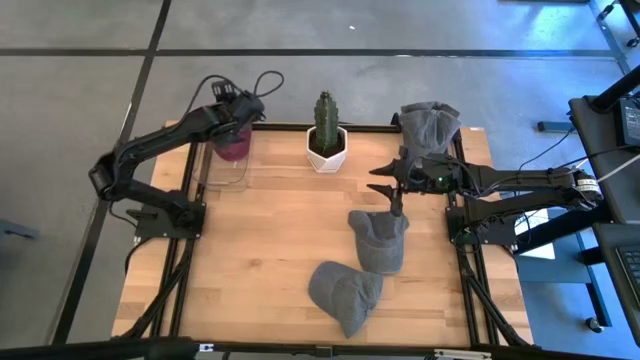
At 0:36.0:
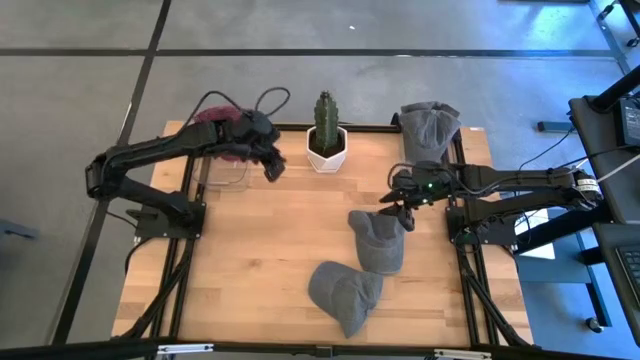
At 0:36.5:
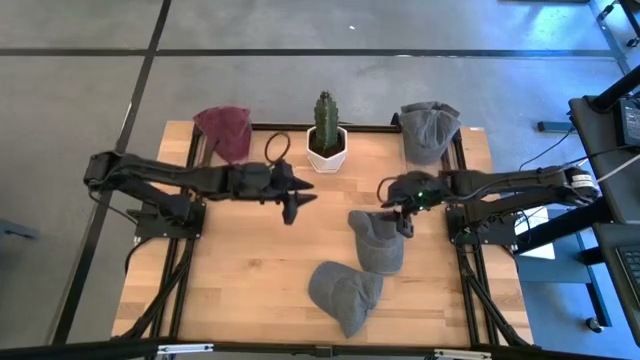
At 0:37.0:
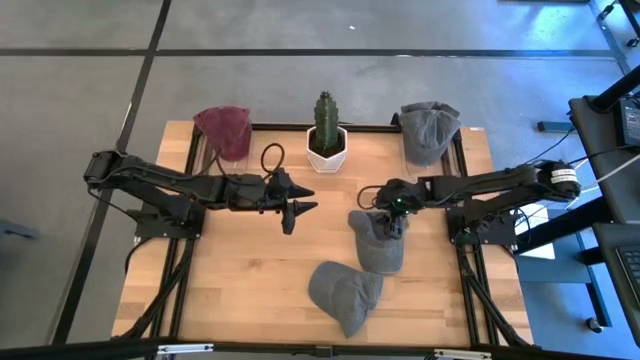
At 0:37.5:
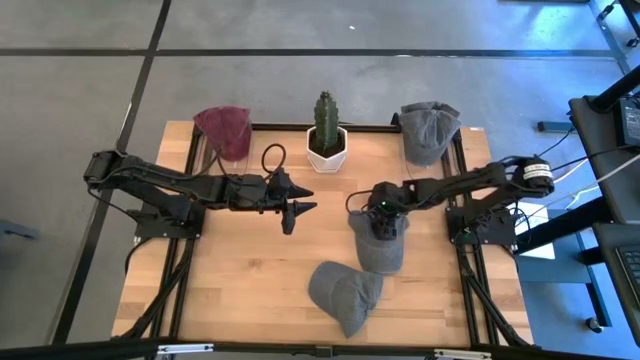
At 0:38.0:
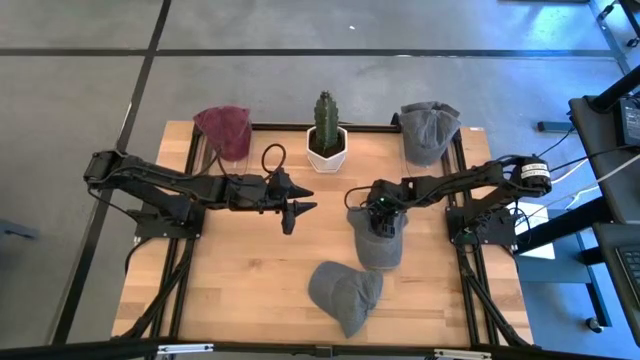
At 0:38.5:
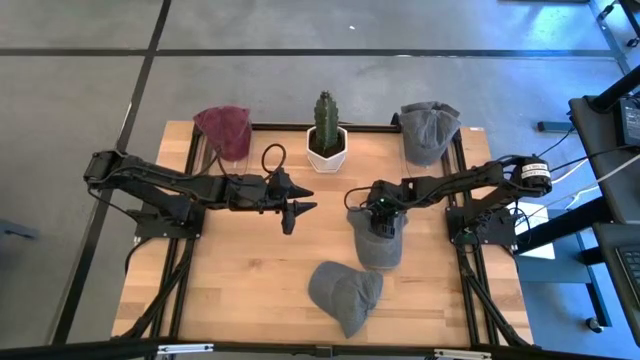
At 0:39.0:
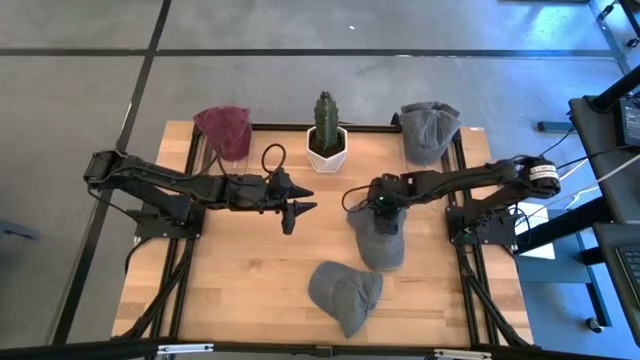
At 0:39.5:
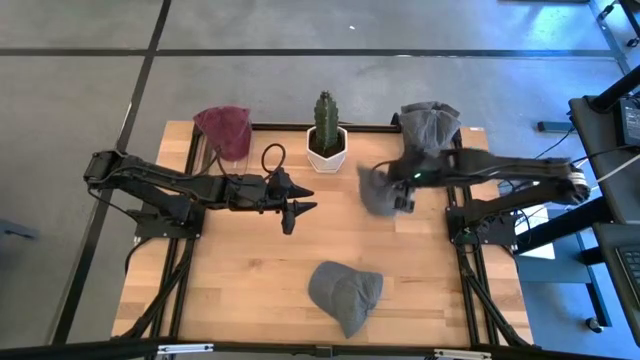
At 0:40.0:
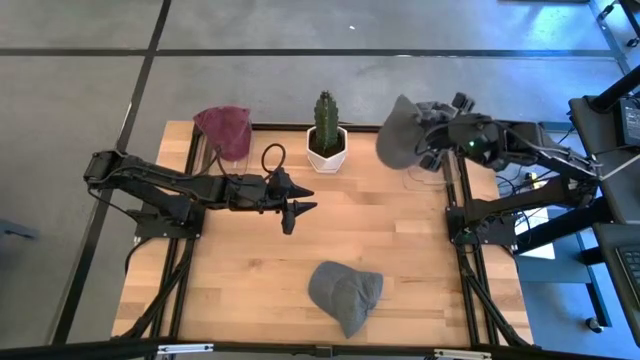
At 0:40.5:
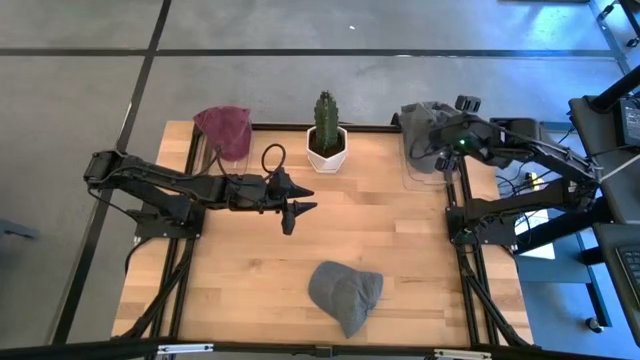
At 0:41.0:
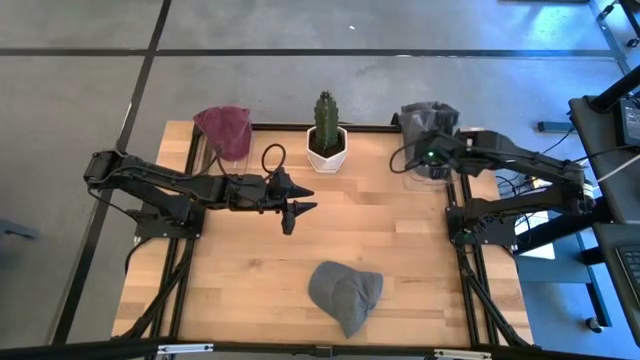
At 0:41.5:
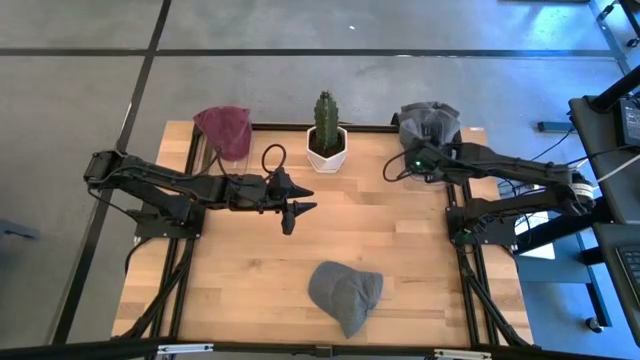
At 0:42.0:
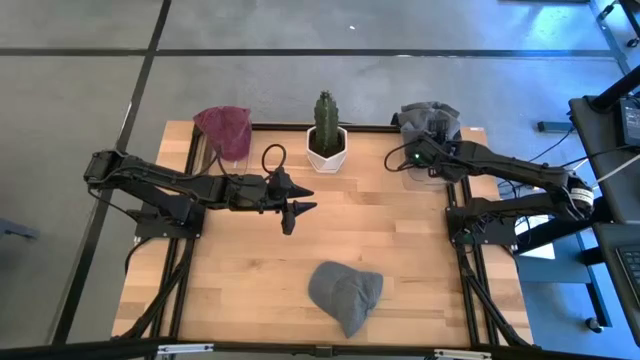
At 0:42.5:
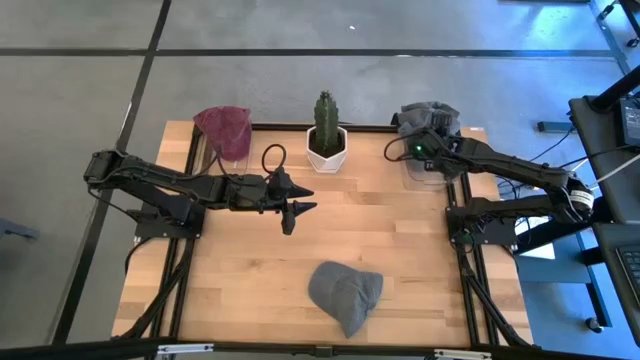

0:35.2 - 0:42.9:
Task: Pick & Place hat
Put the gray cap into the right transparent bin

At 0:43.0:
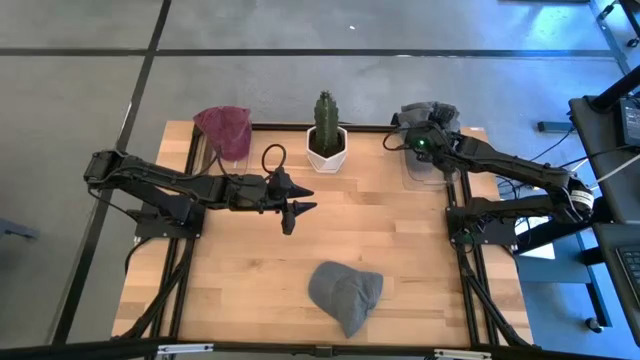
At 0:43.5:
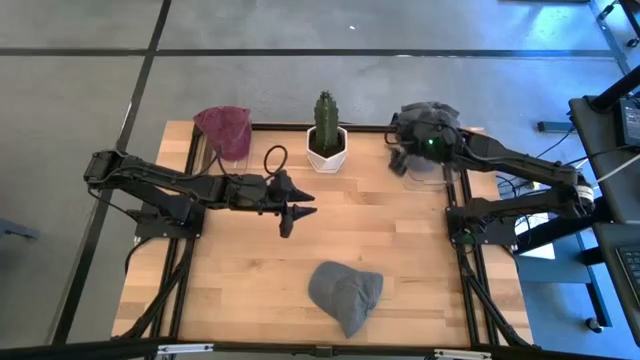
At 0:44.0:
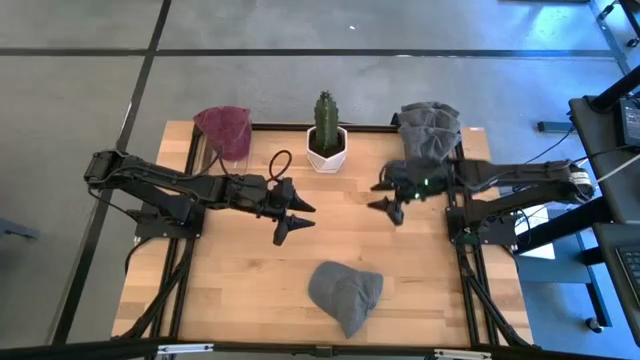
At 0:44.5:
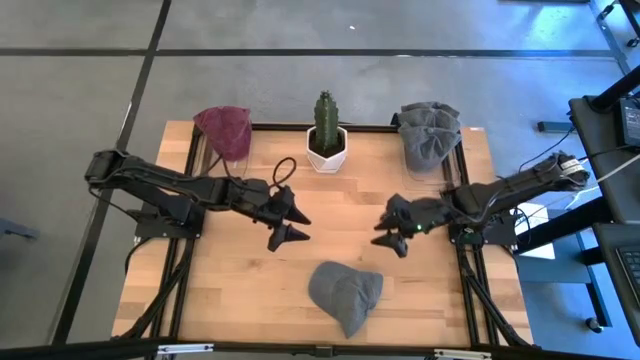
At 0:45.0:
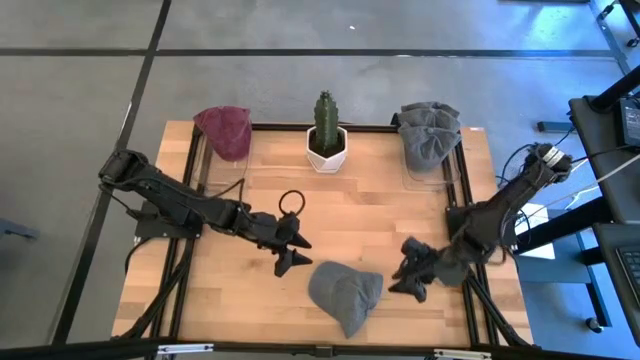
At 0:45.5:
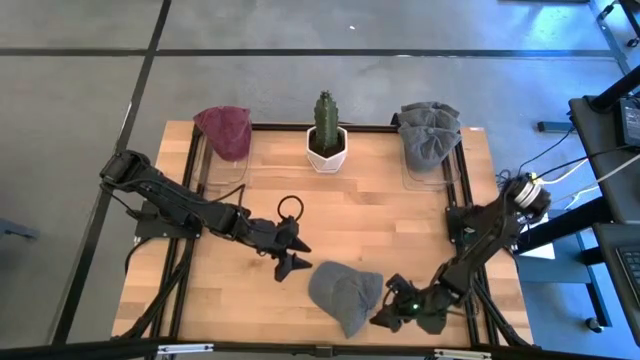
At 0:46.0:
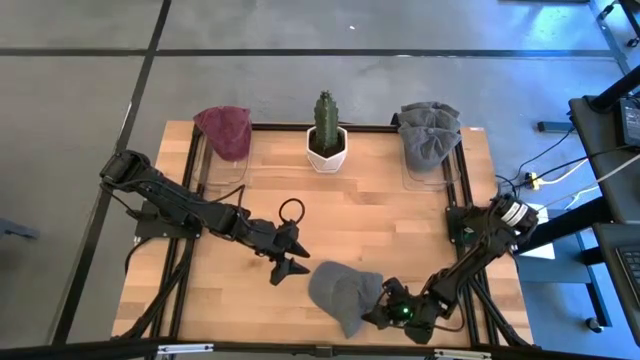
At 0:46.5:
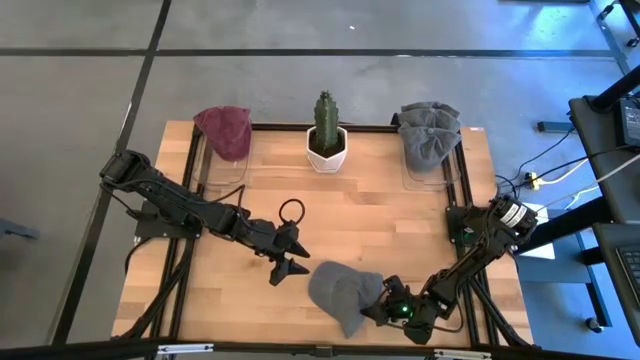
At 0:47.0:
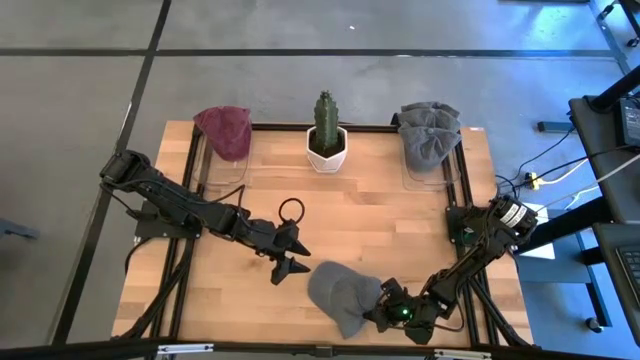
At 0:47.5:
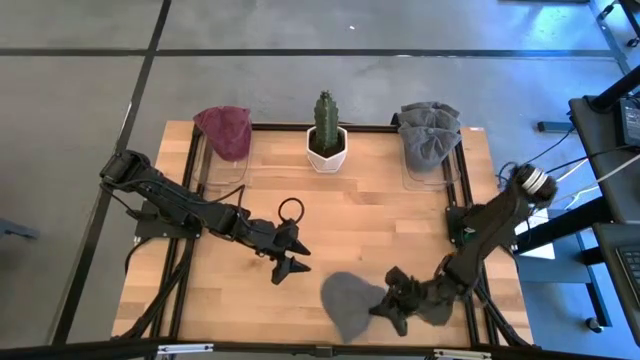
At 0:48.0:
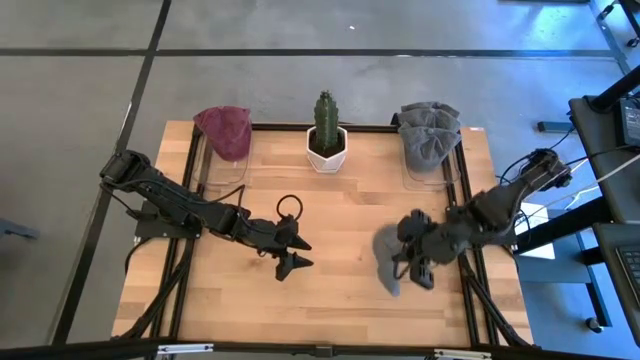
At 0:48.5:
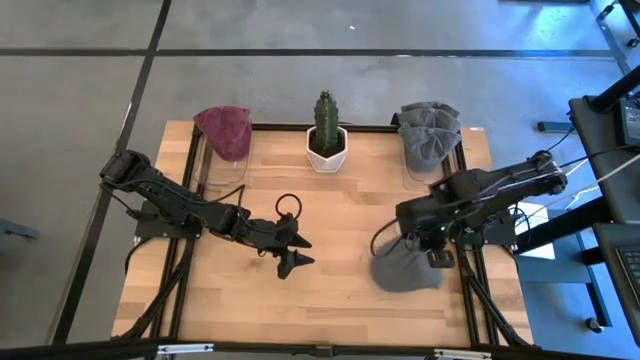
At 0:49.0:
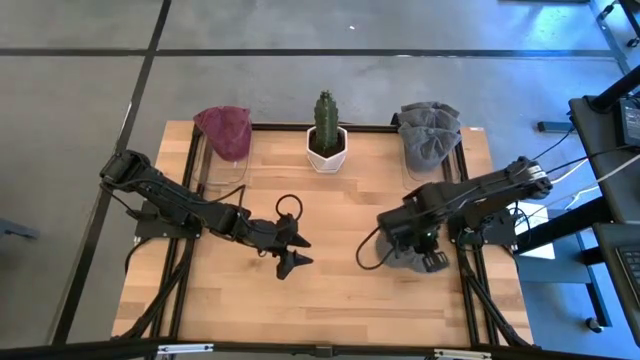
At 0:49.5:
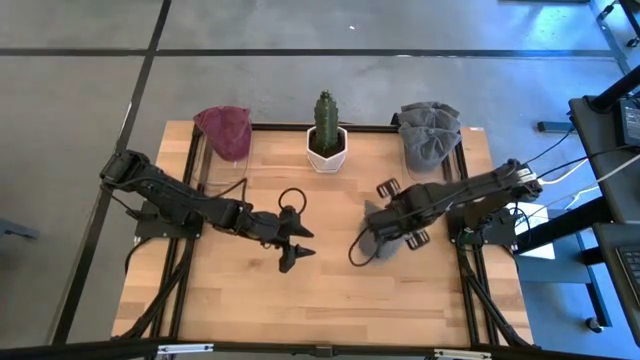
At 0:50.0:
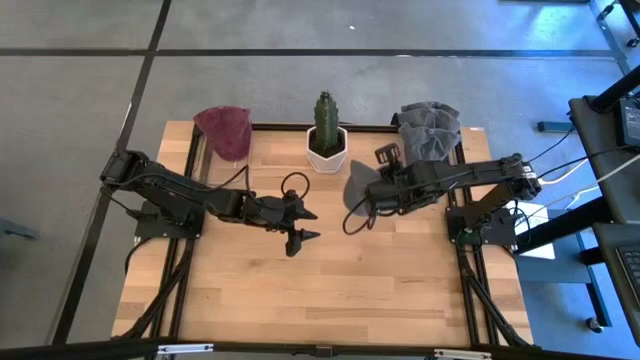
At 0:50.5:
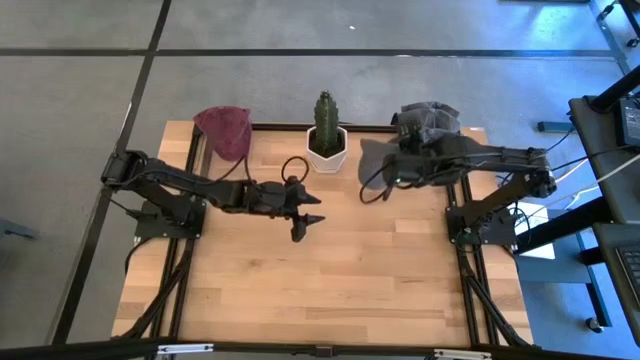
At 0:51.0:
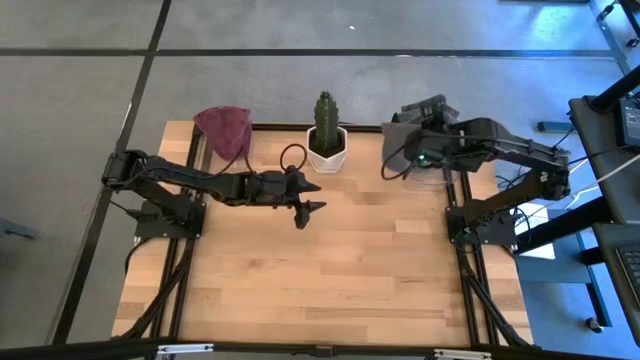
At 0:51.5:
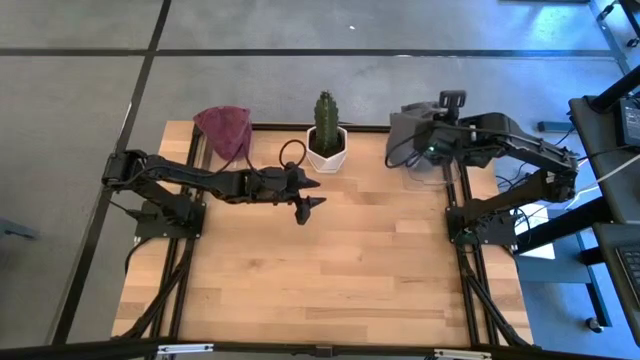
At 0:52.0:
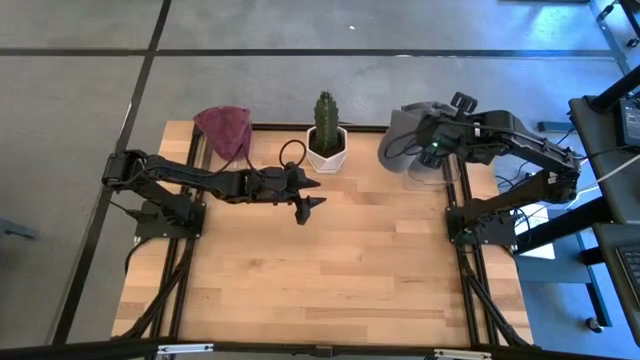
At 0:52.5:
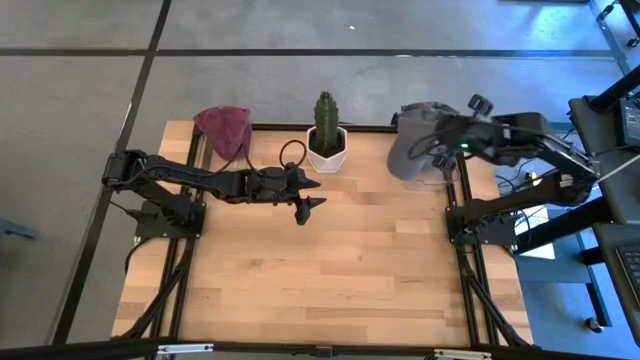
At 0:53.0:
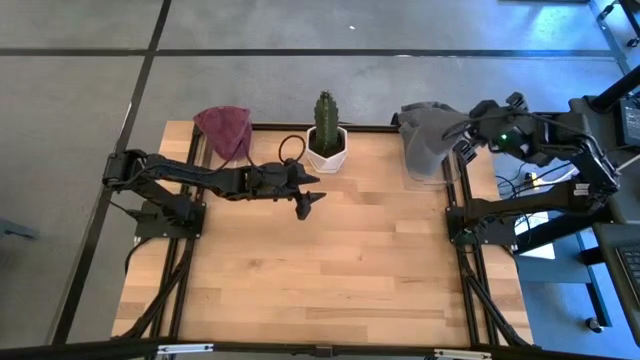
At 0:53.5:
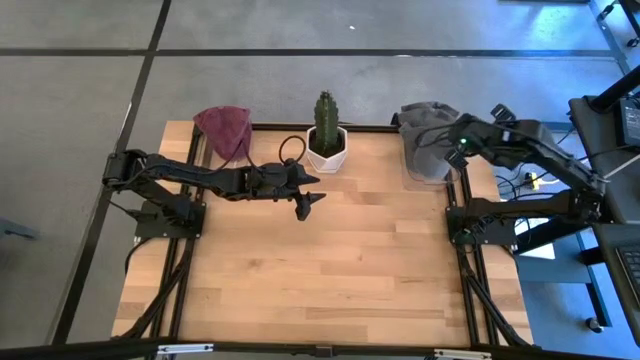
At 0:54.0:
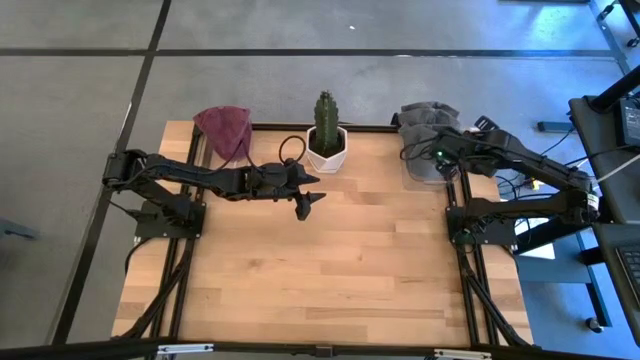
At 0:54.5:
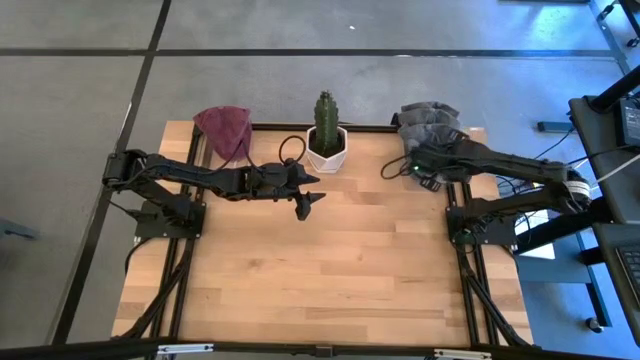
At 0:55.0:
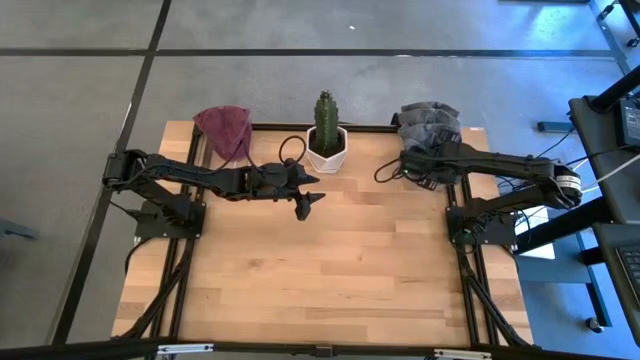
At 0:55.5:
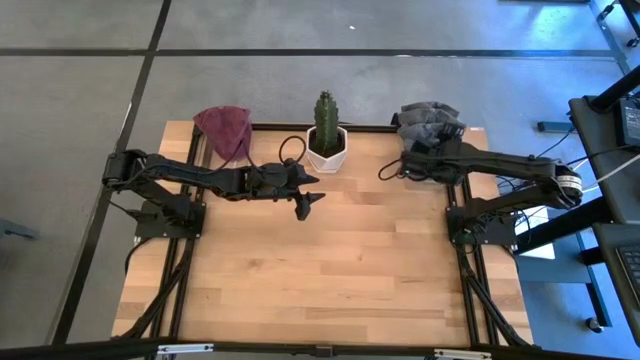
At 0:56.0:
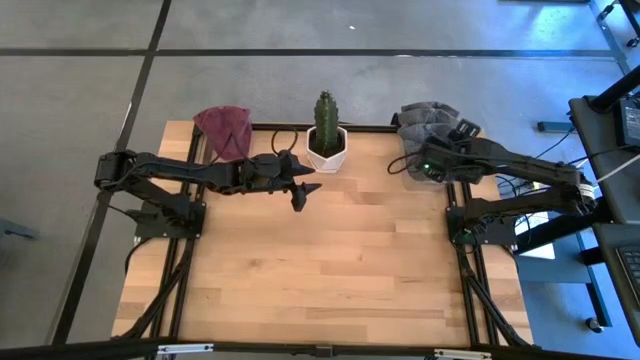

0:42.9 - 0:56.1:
Put the gray cap into the right transparent bin

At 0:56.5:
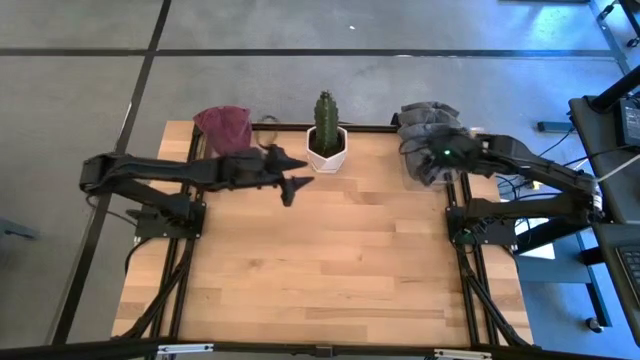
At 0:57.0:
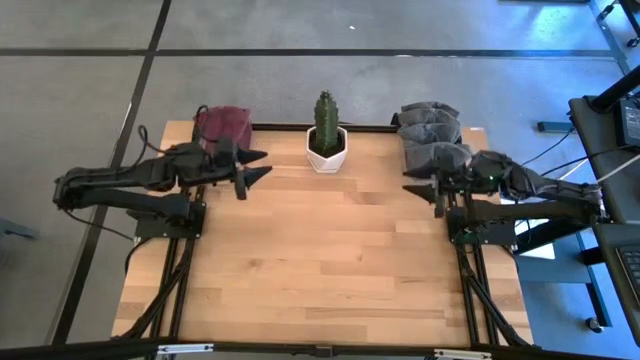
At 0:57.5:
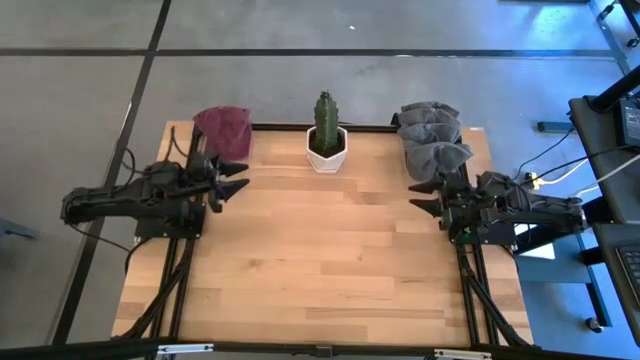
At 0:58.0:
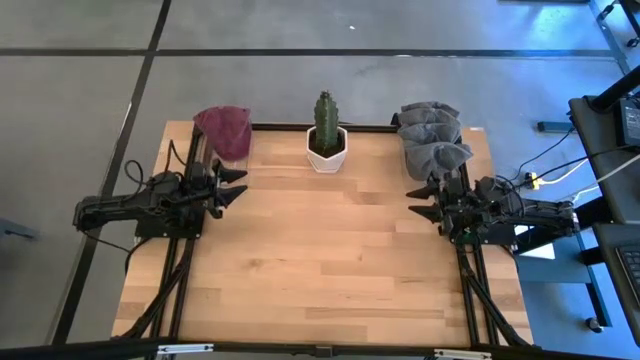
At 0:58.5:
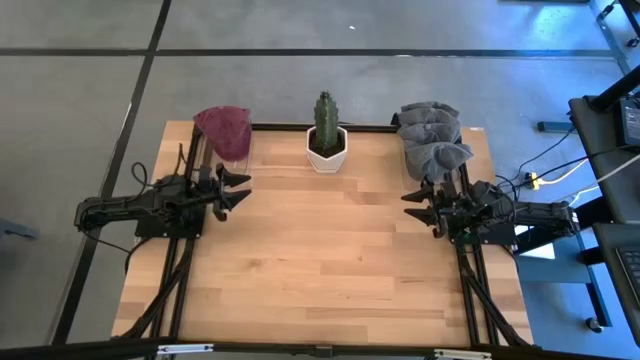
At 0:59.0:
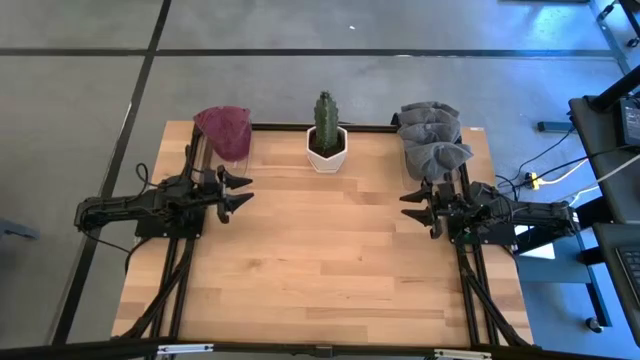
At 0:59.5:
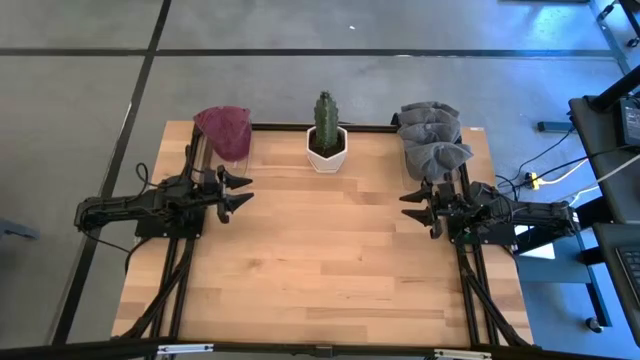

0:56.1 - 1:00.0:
Return to Home Position
